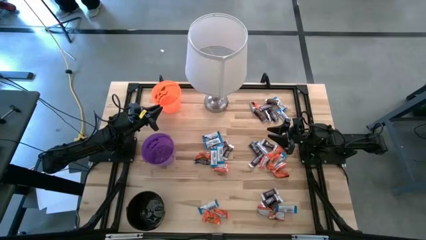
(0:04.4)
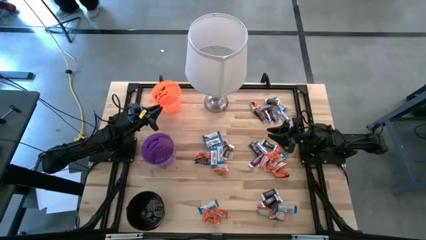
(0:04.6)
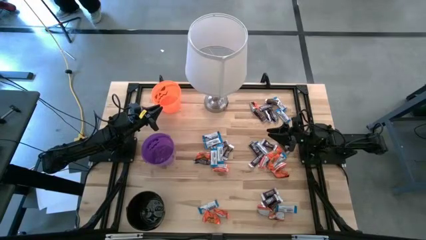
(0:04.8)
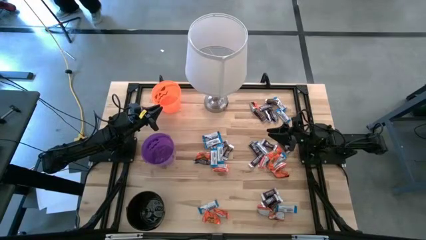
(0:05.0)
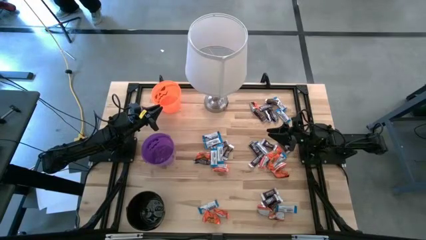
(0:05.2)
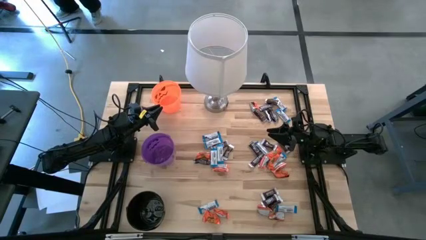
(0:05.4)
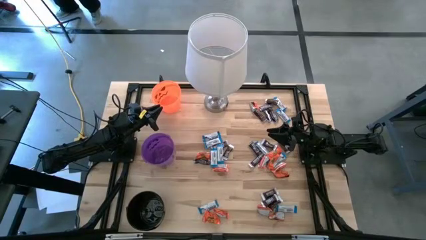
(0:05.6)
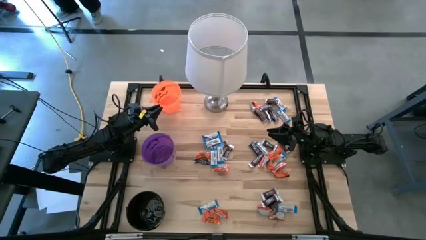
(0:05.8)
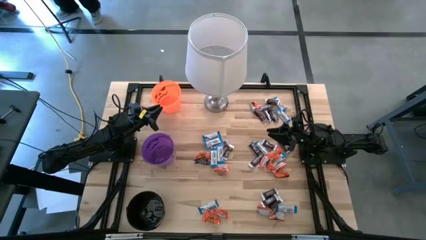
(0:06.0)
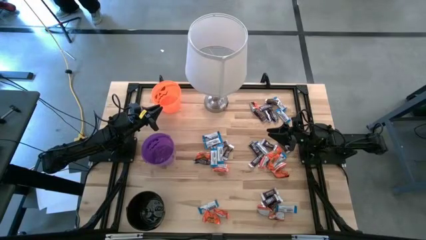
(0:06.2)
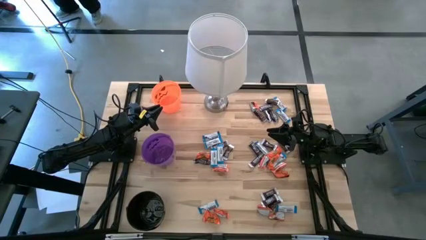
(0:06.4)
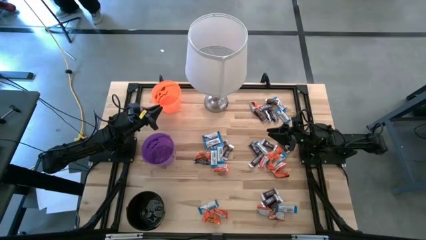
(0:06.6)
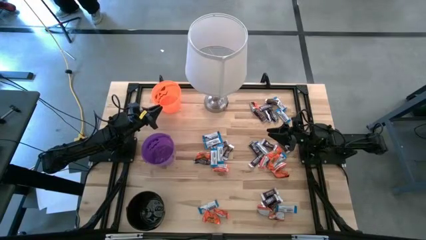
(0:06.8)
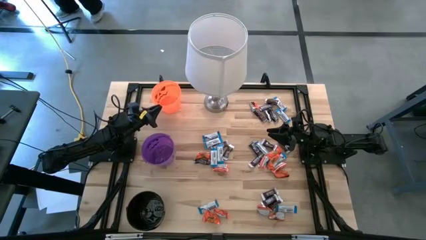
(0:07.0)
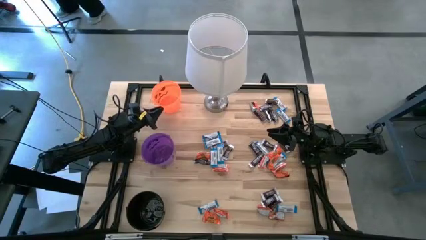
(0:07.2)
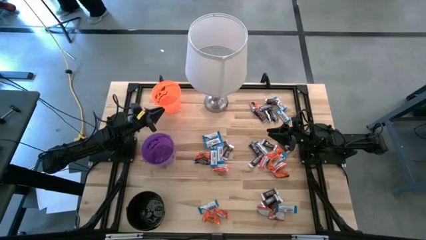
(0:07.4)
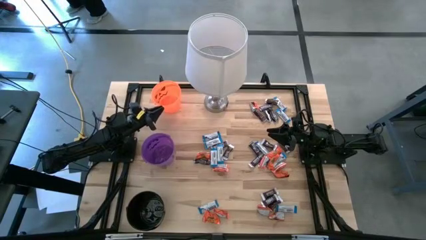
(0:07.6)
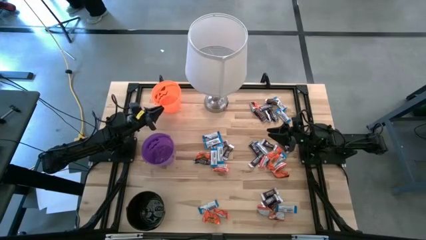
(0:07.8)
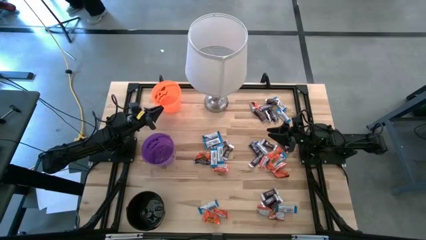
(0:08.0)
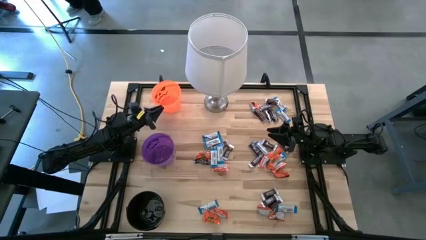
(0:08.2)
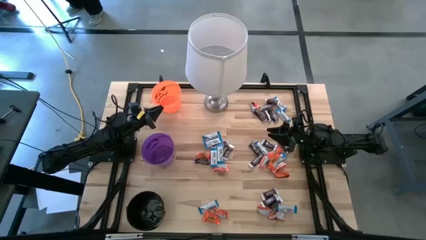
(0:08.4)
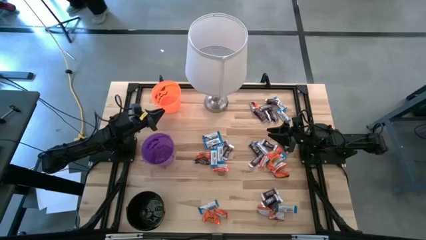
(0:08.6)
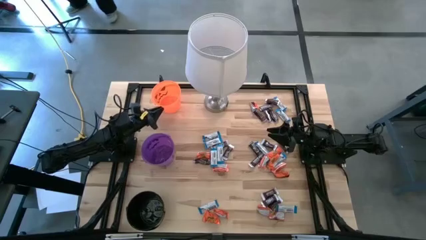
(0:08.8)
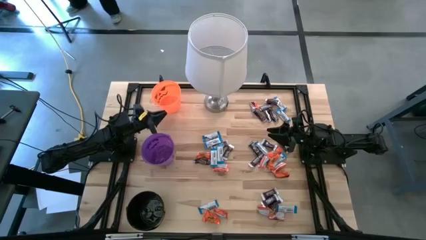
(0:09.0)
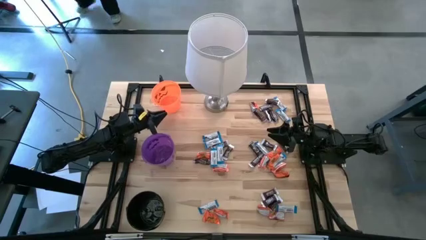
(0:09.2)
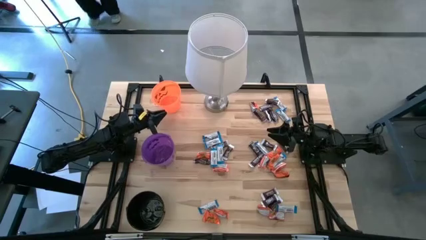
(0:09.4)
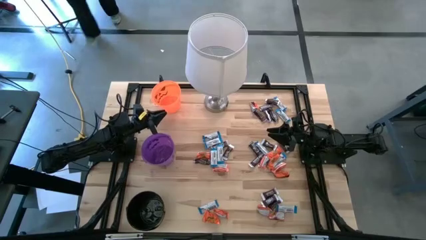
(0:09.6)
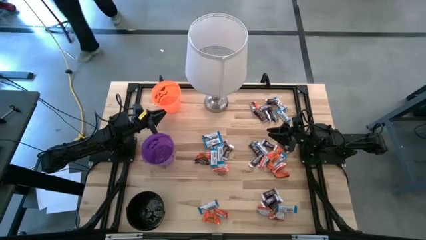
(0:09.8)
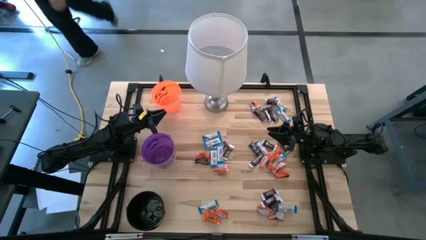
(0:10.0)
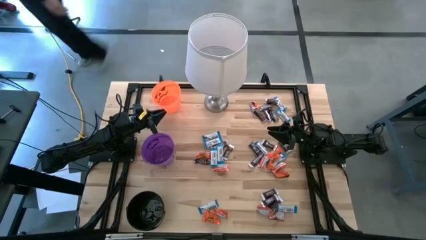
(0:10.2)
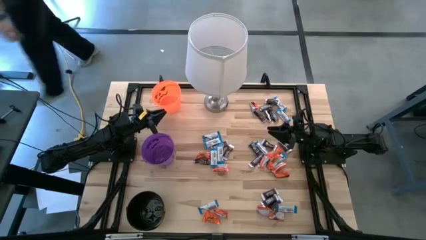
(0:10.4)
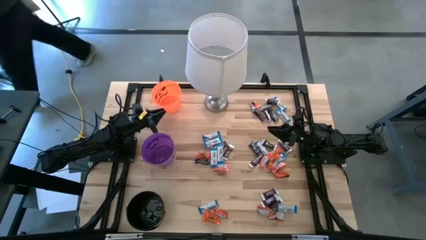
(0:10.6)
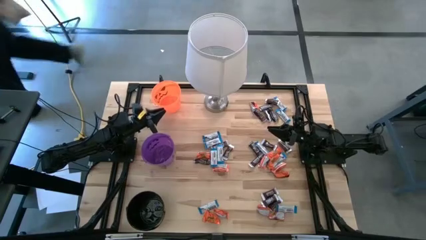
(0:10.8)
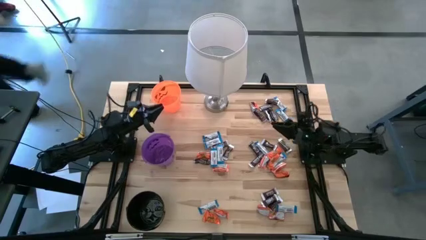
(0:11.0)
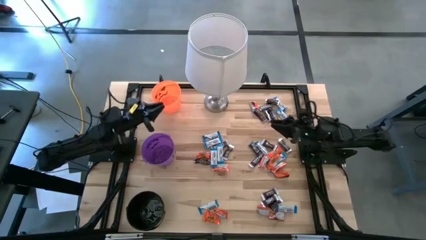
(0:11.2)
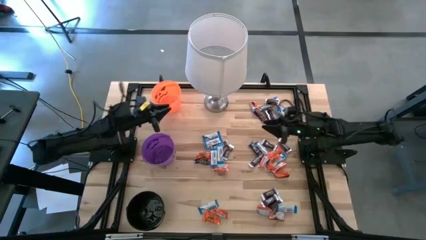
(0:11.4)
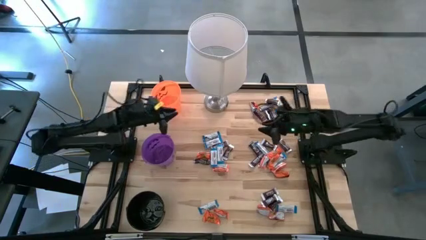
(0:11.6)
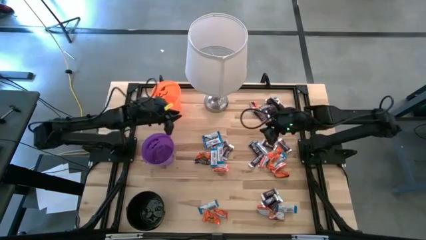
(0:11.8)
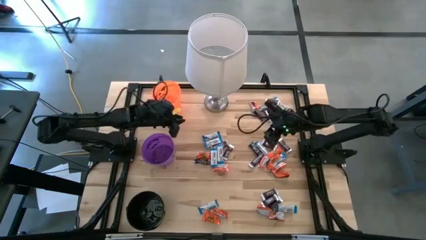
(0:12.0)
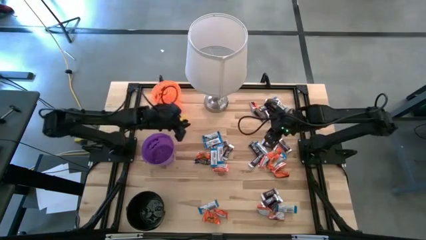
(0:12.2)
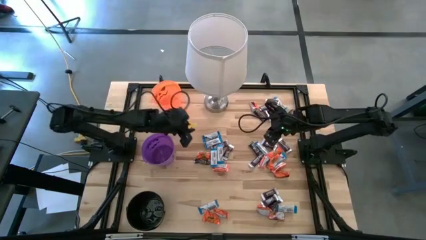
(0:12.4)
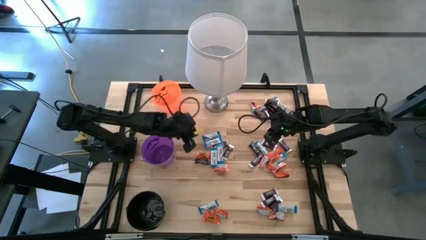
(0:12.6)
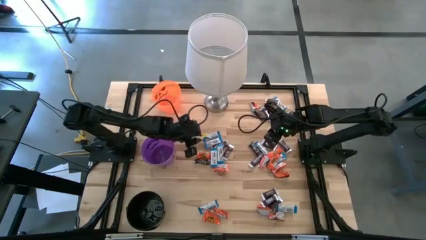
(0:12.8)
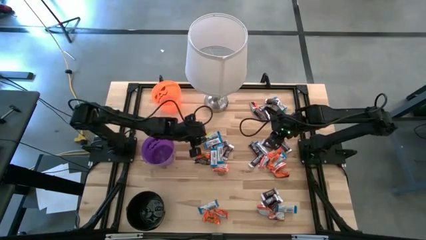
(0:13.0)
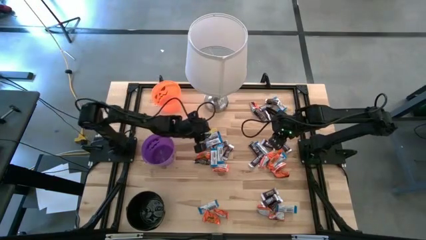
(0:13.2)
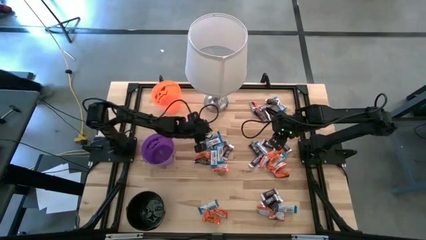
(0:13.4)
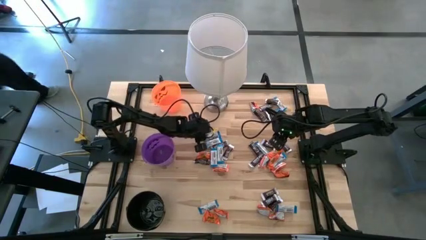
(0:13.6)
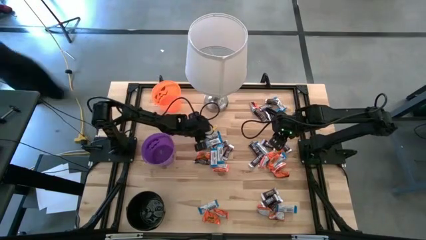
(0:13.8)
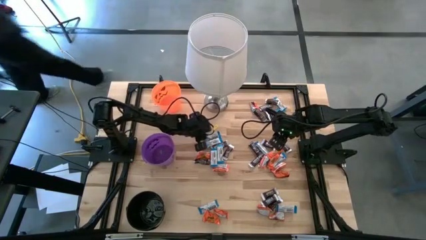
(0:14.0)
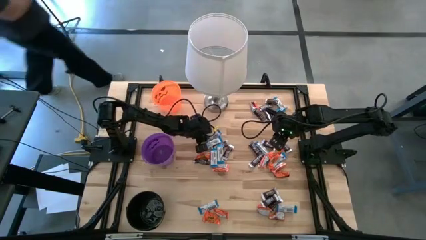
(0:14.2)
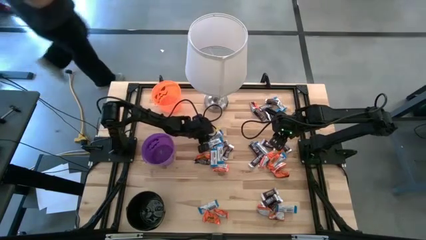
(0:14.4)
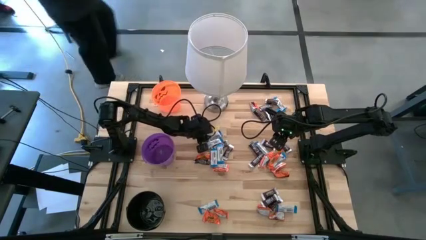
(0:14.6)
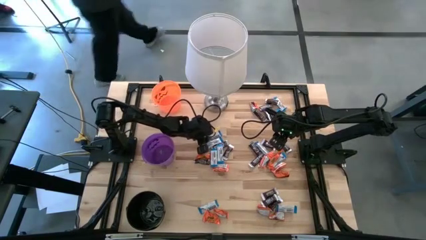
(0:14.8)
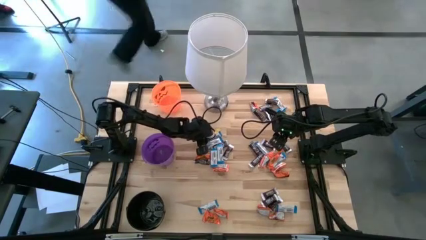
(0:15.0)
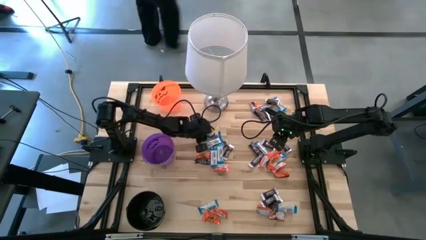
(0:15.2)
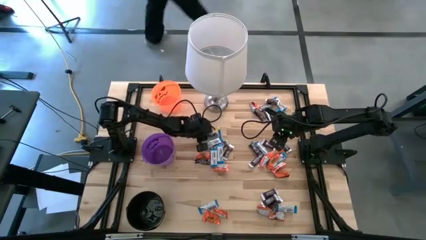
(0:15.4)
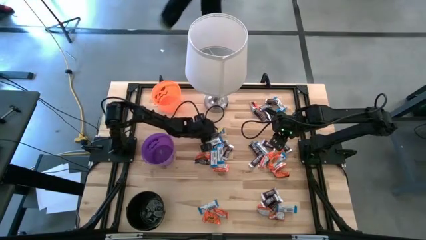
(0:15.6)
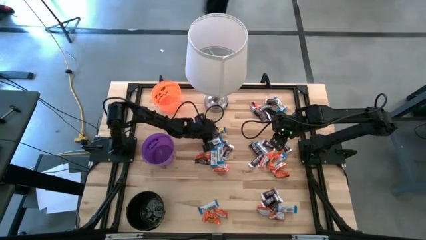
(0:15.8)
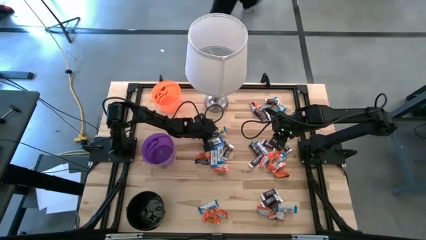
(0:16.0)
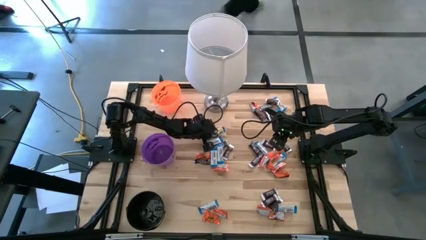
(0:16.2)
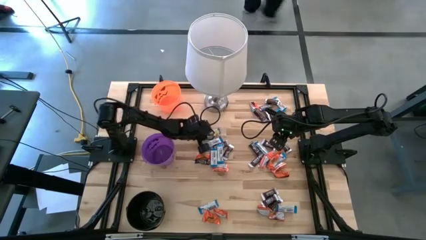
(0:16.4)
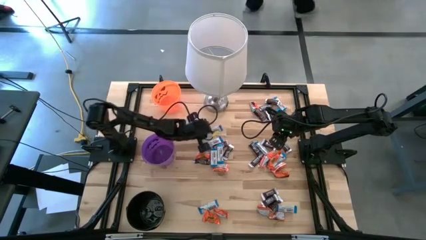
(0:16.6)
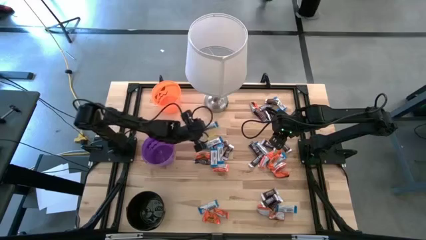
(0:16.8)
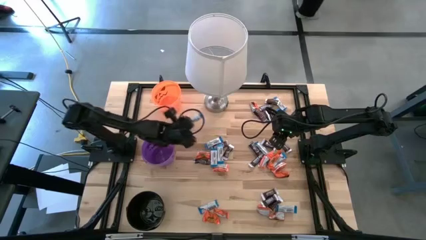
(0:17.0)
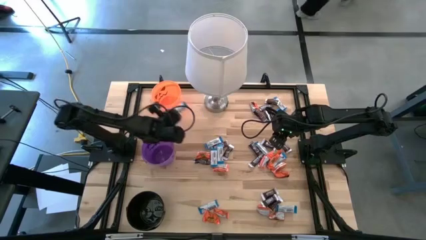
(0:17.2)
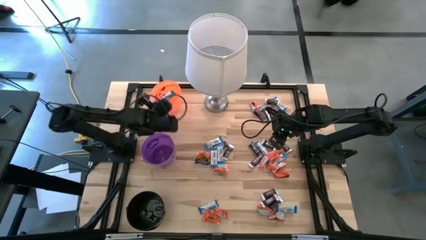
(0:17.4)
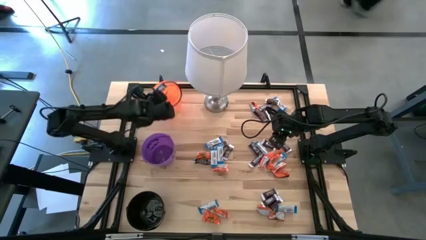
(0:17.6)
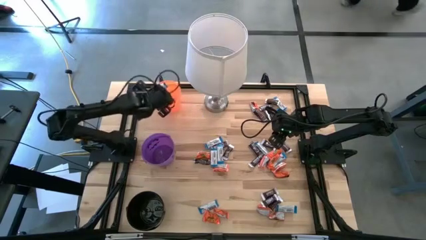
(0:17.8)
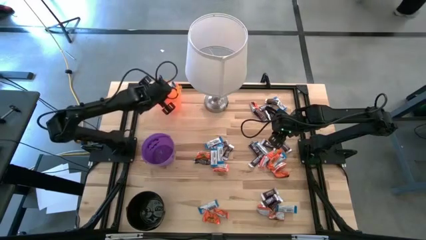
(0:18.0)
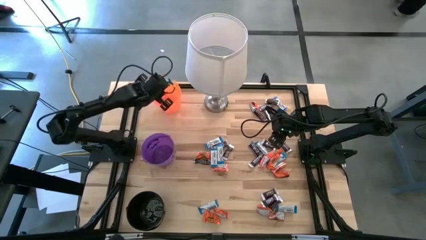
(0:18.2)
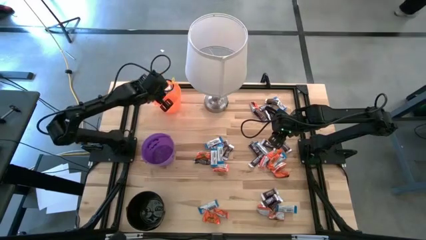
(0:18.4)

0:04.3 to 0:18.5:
Task: Sort candy
Put the white chocolate into the orange bucket

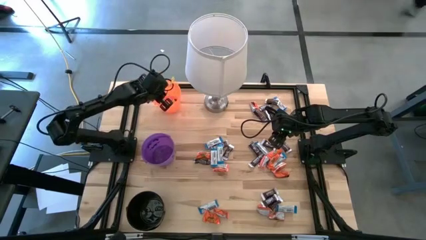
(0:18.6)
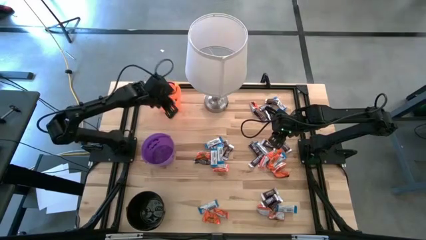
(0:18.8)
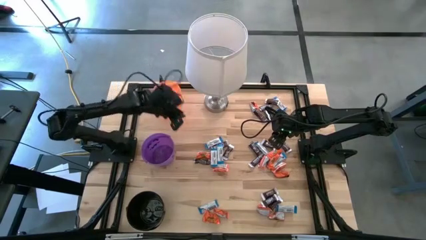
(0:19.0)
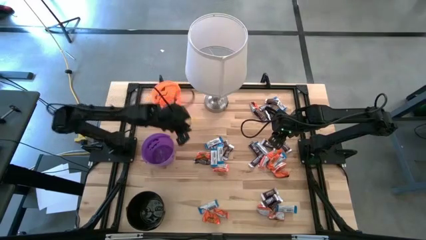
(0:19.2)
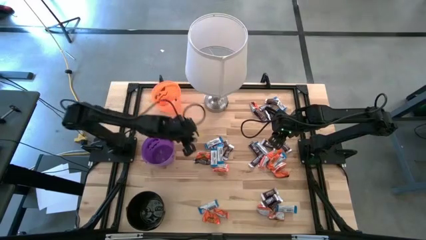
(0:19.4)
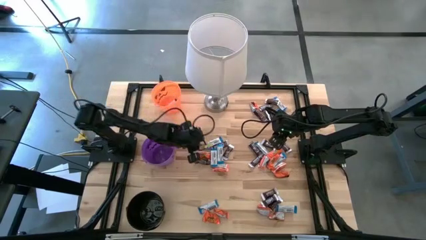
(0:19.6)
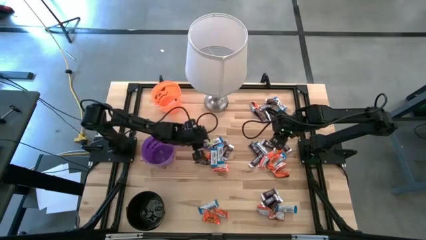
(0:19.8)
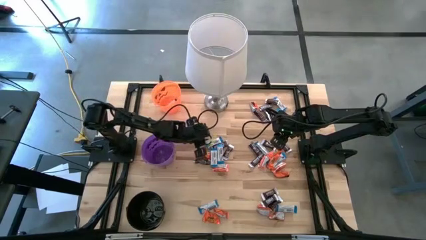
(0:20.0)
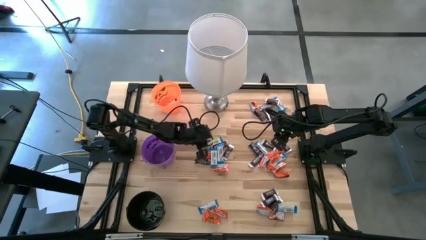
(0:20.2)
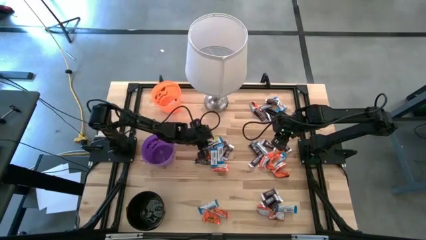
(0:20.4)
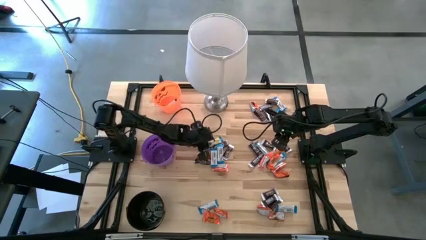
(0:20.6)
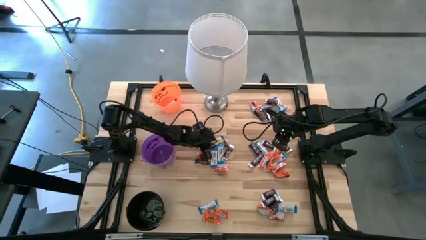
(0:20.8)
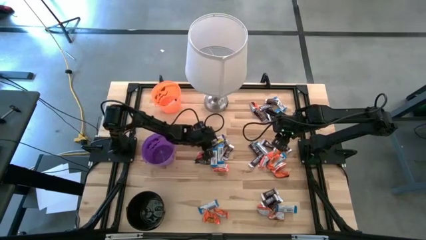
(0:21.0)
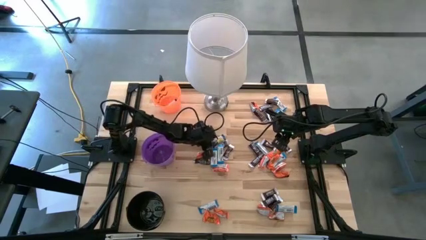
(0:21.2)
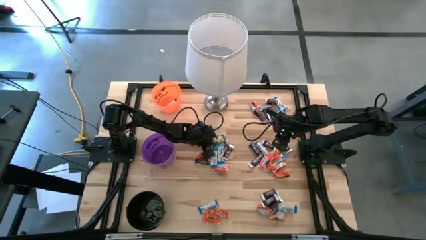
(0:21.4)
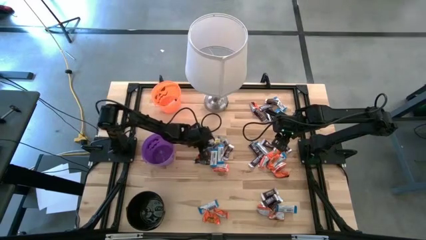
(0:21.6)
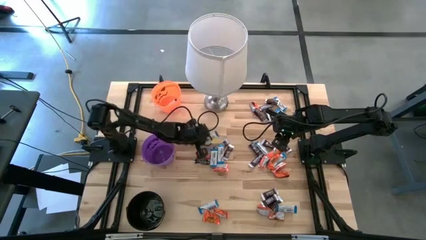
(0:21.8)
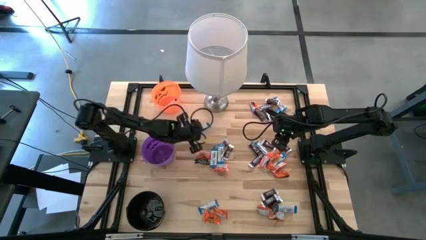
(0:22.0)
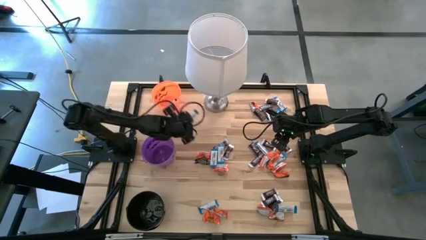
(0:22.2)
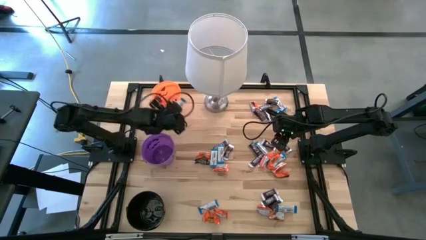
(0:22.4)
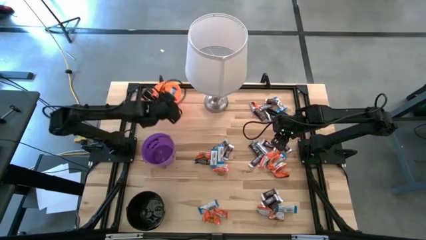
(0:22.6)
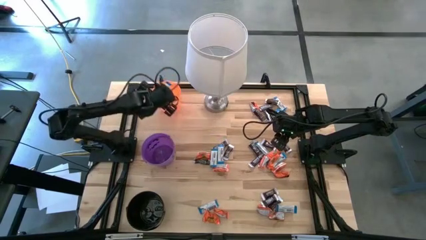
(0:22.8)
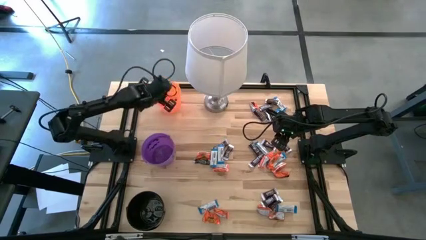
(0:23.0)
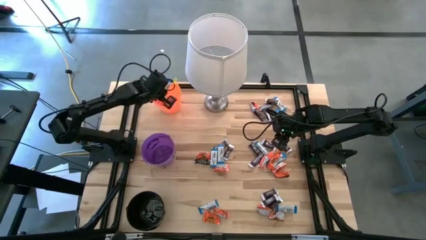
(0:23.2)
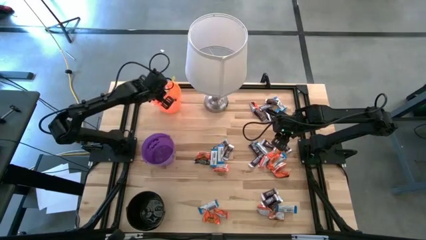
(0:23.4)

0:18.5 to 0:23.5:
Put the white chocolate into the orange bucket
